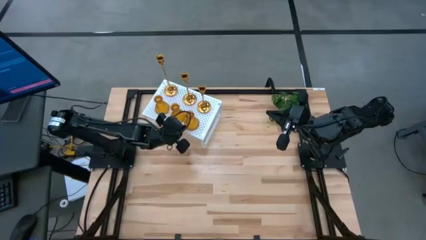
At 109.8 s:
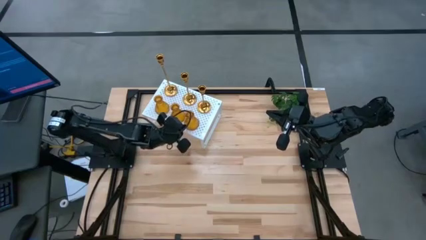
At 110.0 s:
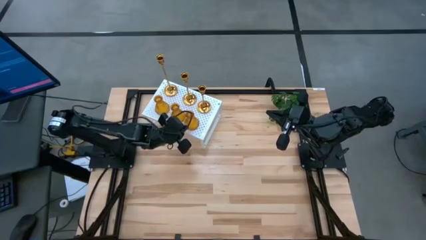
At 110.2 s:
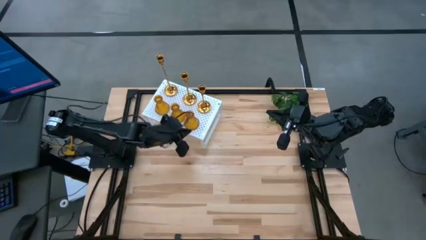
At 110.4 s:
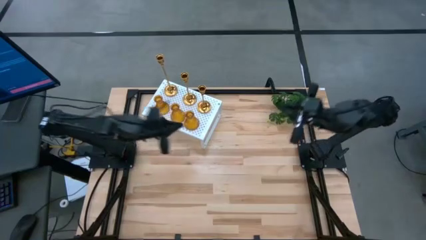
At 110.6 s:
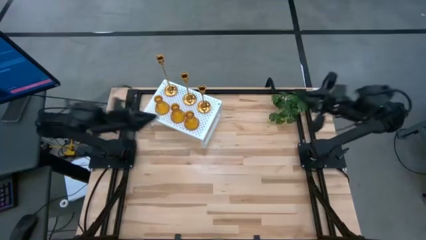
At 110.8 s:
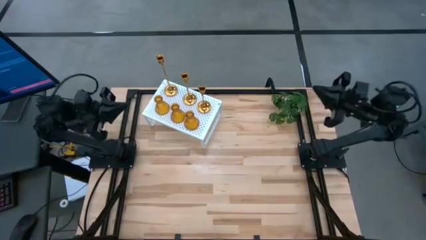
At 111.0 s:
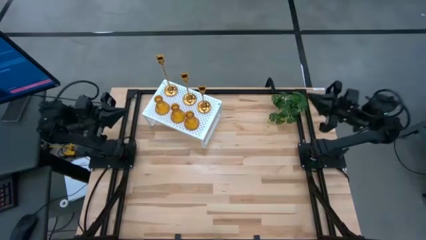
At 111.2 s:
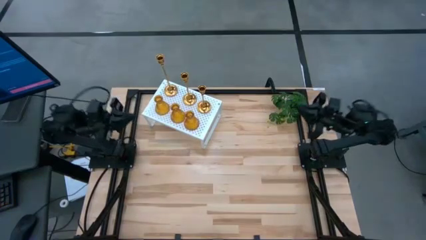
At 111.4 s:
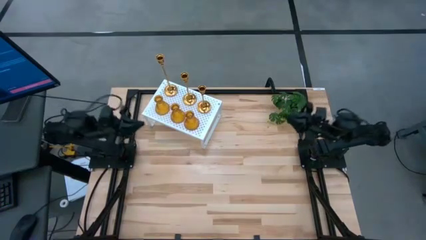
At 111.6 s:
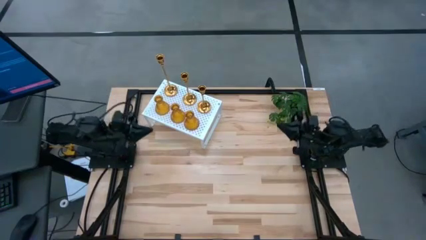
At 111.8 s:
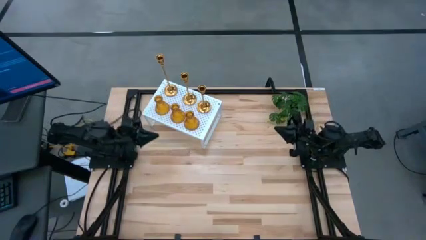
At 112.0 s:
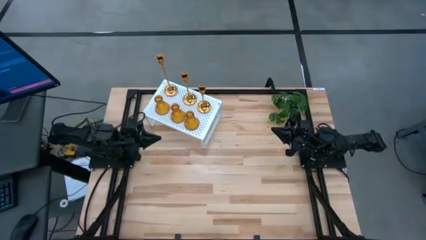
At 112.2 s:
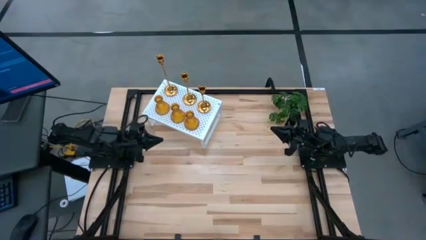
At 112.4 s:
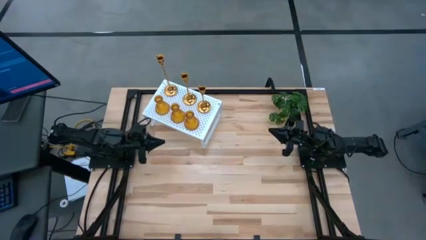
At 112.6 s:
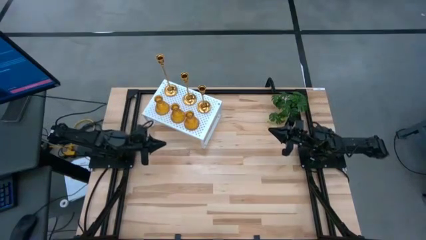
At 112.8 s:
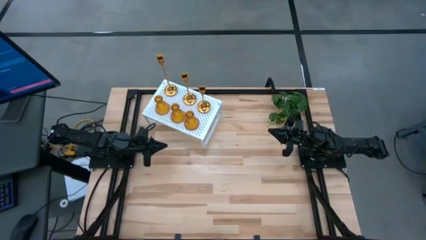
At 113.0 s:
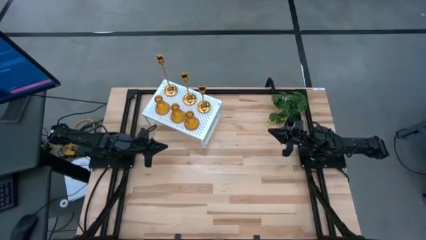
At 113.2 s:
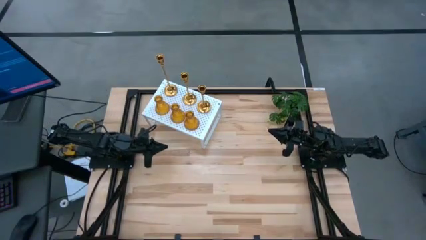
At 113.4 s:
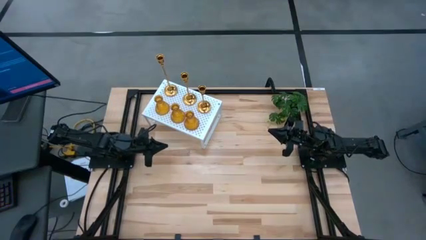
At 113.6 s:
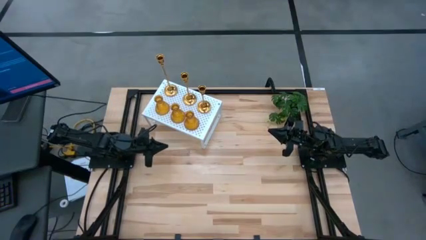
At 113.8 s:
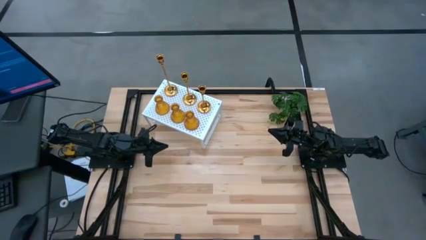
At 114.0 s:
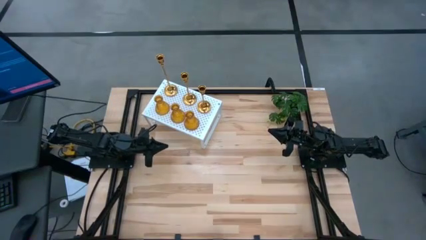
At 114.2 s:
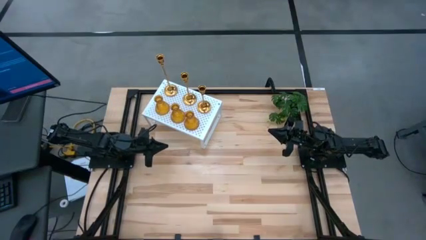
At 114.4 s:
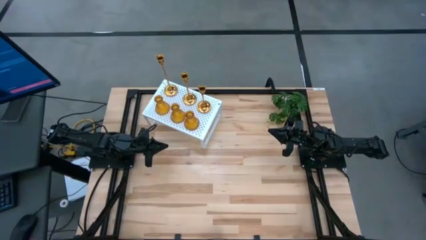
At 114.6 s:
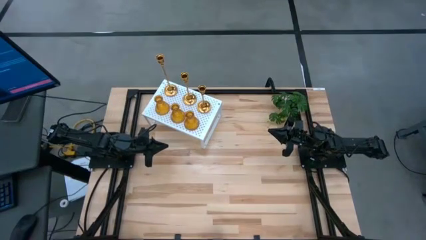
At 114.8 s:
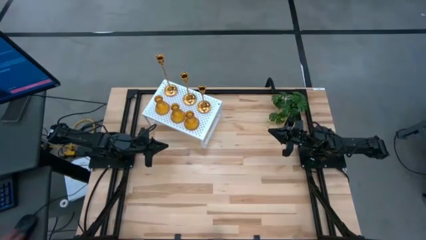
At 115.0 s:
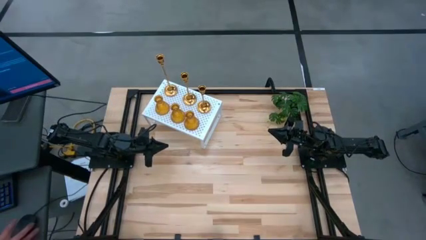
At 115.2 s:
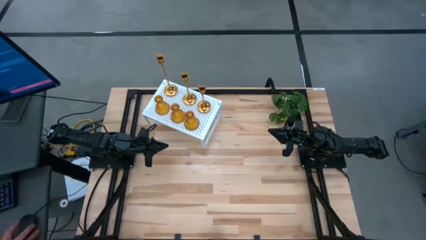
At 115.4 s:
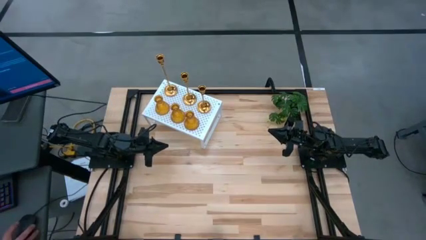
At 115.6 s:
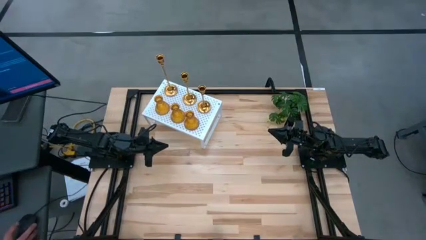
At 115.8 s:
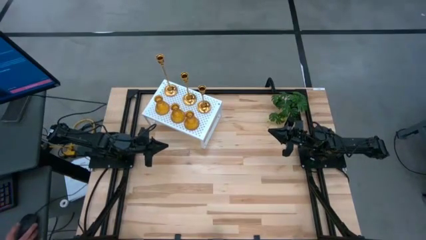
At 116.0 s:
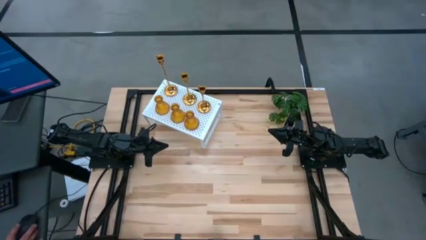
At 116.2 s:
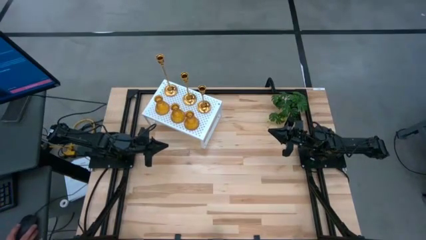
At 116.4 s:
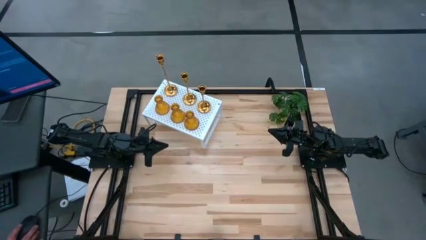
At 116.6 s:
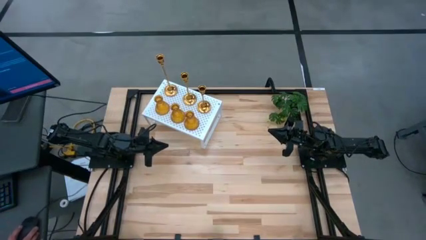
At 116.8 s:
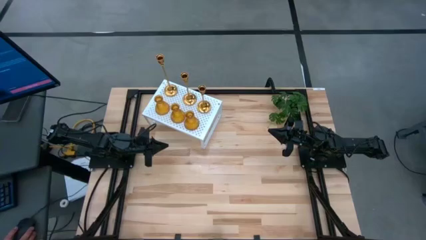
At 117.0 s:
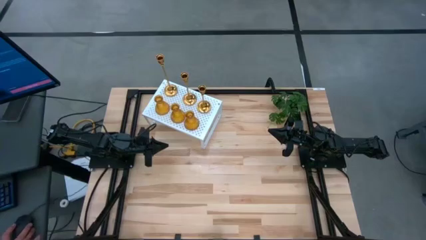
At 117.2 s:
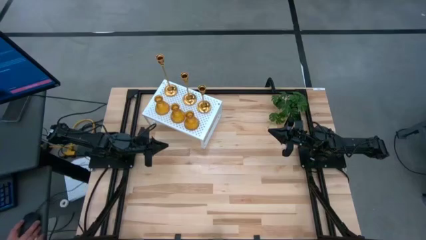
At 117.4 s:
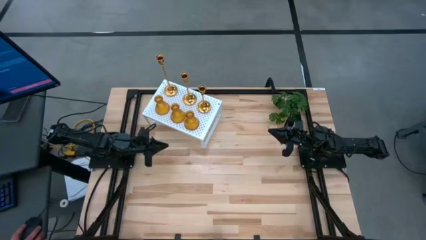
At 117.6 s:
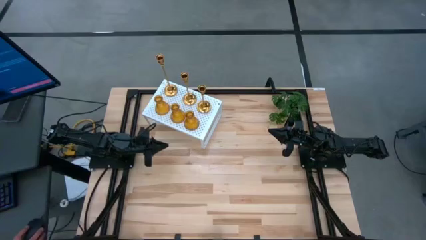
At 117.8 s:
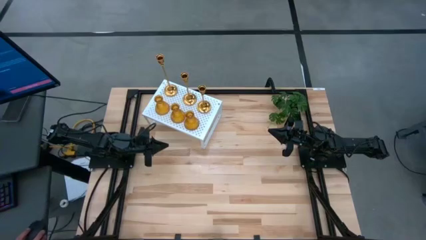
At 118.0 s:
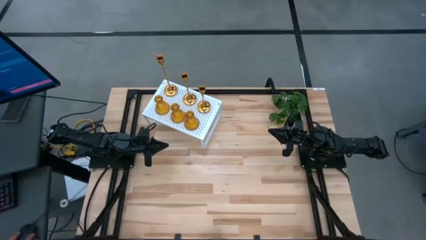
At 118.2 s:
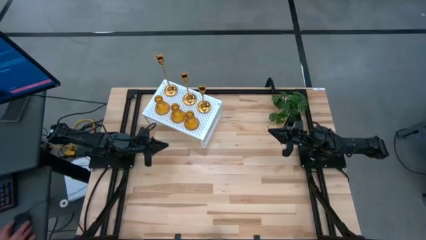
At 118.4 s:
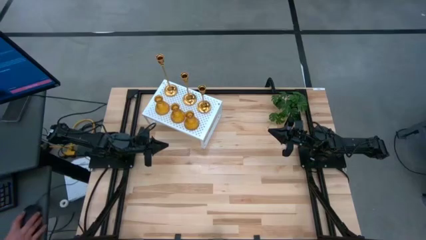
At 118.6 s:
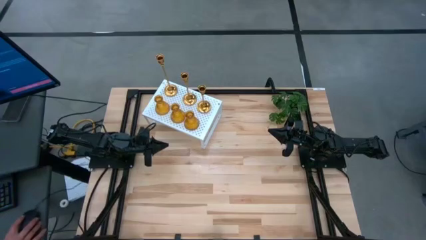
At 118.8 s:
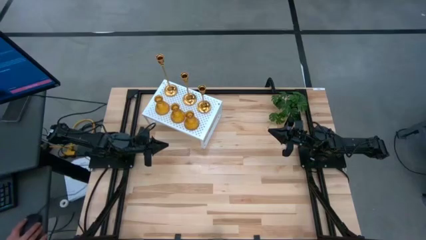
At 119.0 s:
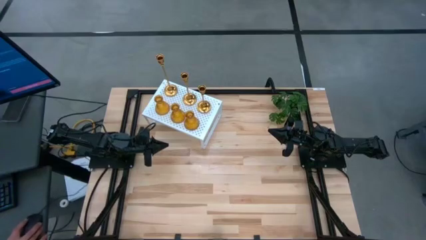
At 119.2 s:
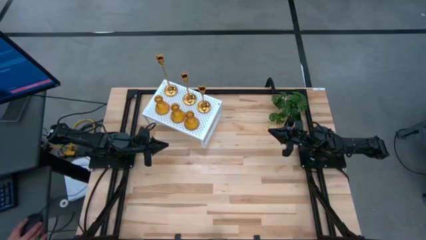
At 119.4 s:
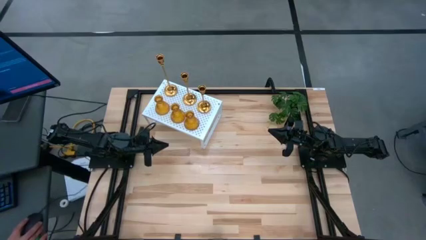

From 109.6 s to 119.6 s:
Task: Pick & Place candle stick holders
Return to Home Position

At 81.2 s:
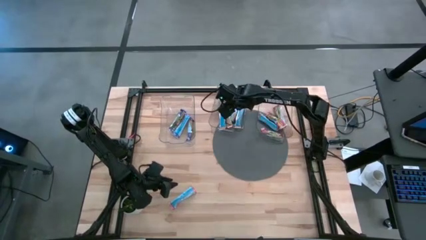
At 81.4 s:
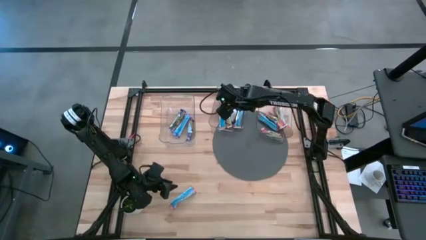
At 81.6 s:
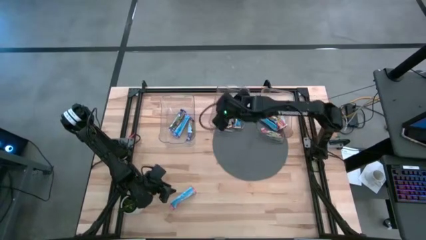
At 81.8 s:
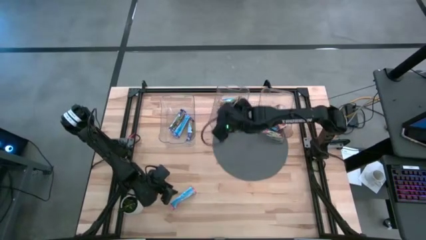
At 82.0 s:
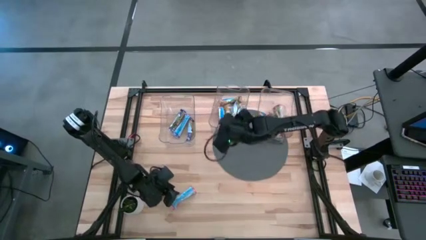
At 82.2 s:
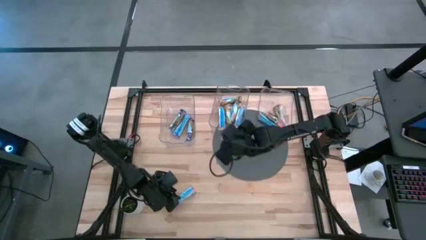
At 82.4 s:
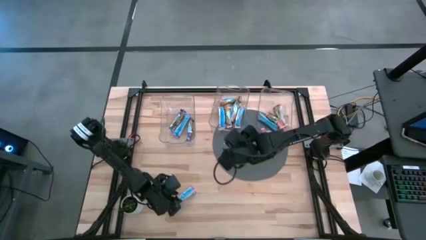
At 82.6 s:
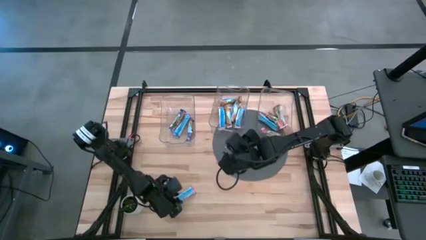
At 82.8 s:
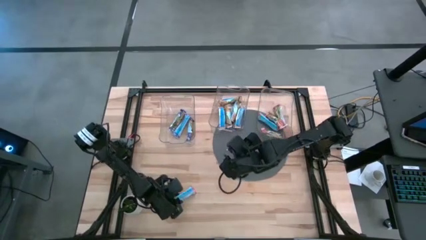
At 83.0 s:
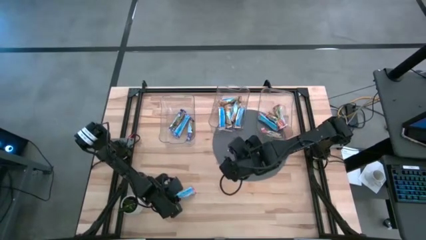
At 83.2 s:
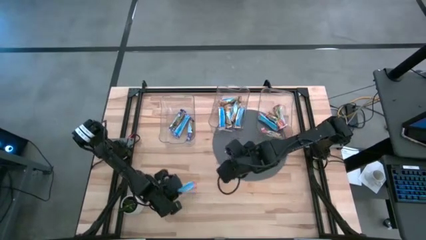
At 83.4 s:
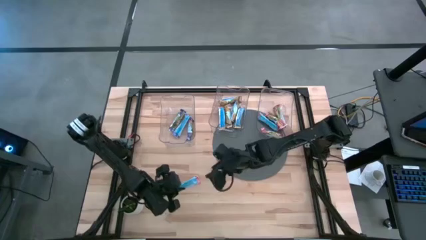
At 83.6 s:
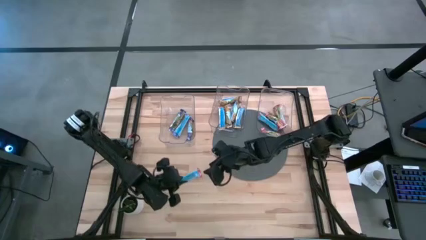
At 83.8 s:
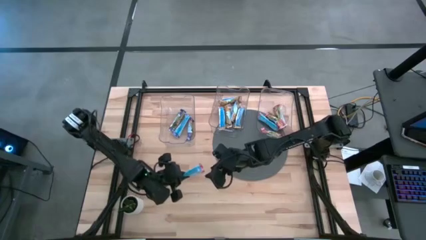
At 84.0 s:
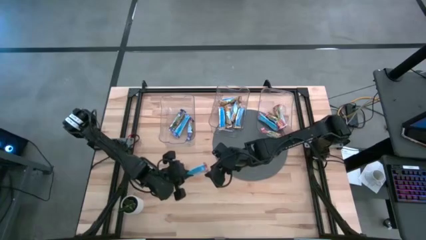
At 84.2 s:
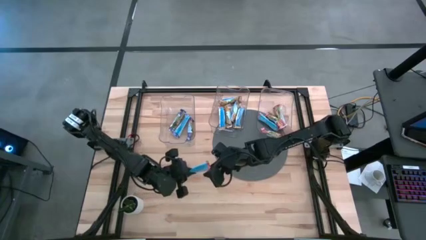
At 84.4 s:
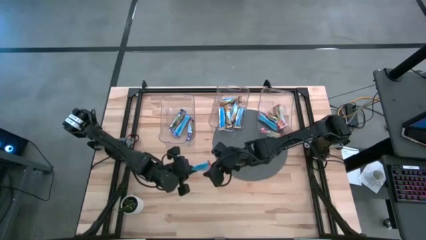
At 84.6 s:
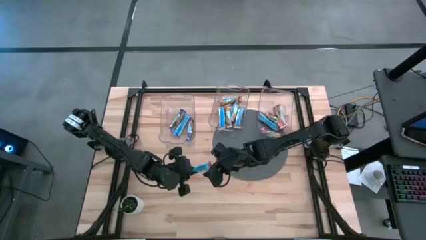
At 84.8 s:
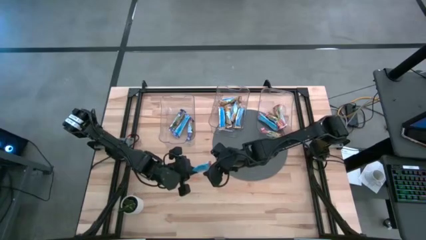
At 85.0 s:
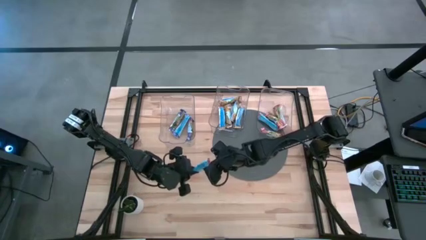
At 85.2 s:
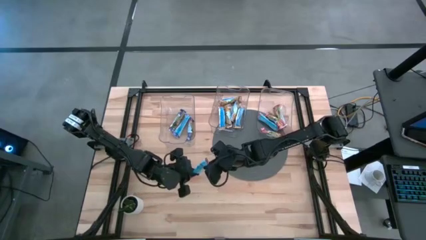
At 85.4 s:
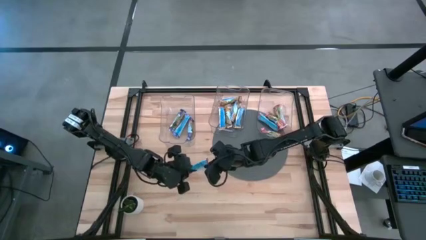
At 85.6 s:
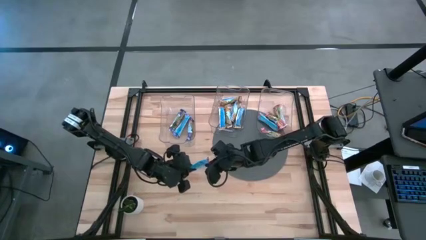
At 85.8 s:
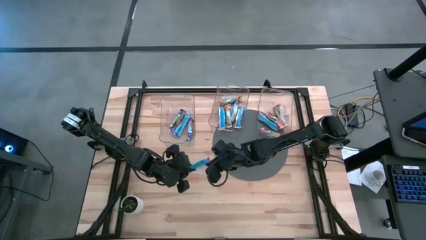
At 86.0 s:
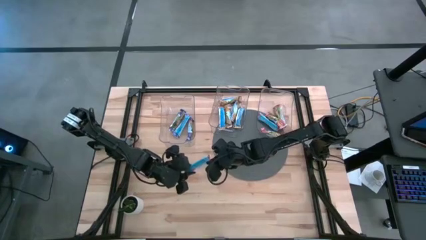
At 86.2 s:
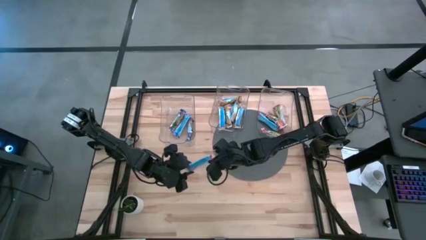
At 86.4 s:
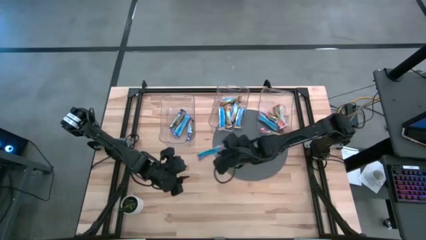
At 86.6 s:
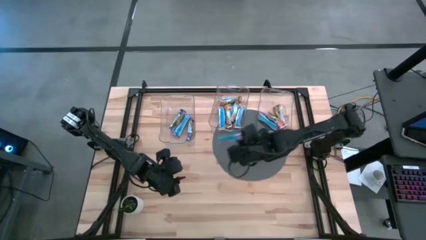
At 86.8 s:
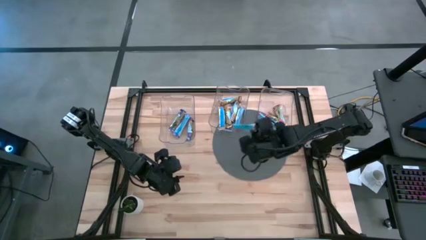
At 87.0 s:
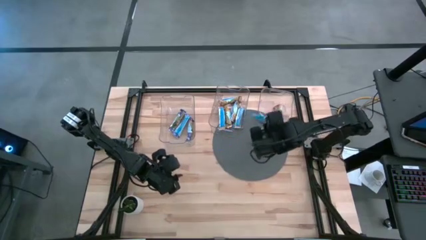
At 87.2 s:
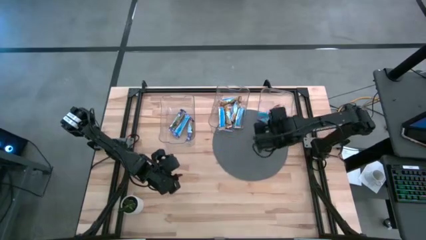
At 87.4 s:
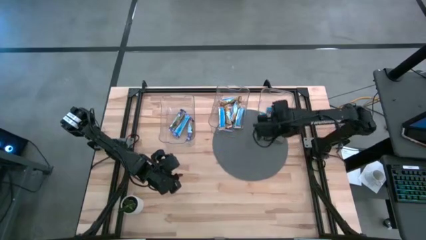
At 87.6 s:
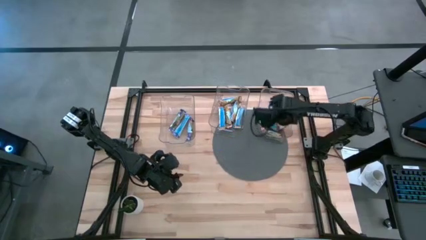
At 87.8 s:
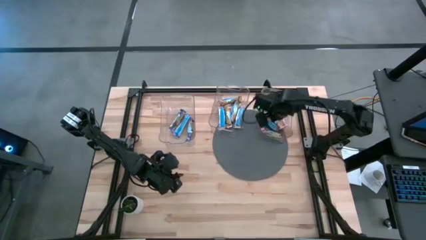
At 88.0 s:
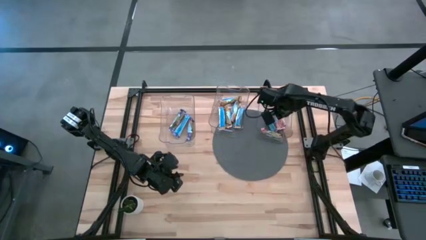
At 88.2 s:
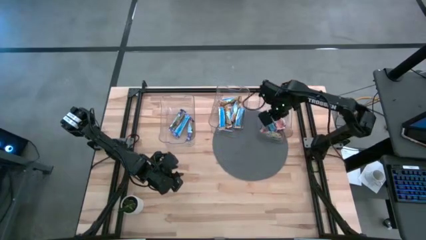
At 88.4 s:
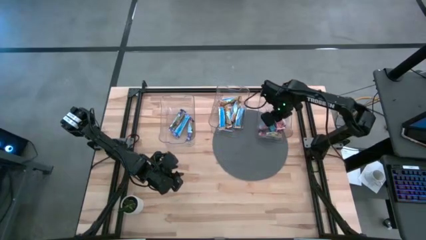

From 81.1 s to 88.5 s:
Task: Pick and place Granola Bars by type
Put the red granola bar into the right transparent bin
